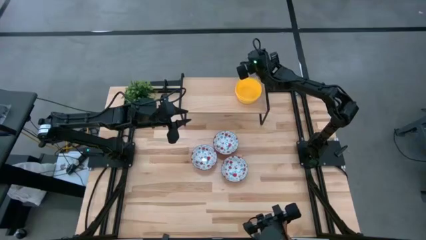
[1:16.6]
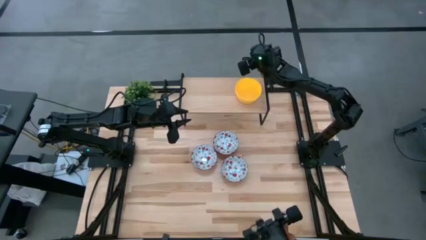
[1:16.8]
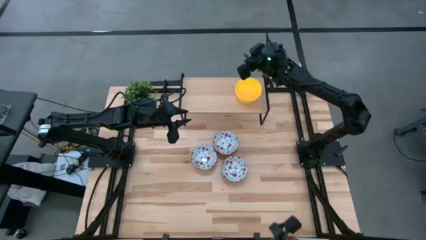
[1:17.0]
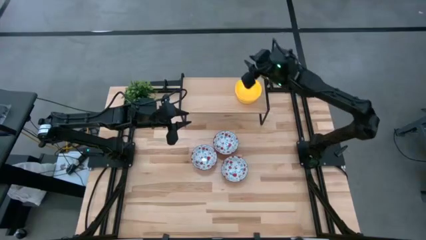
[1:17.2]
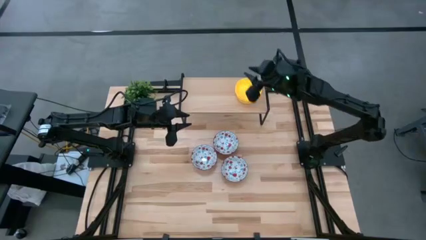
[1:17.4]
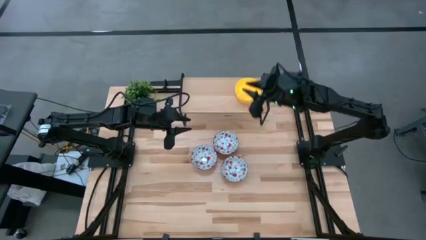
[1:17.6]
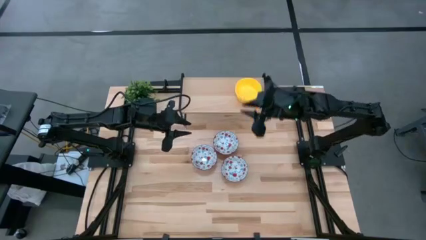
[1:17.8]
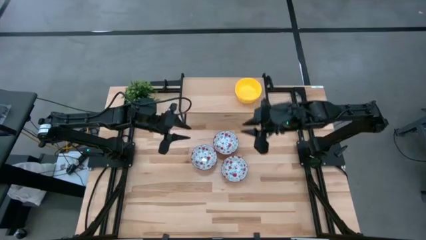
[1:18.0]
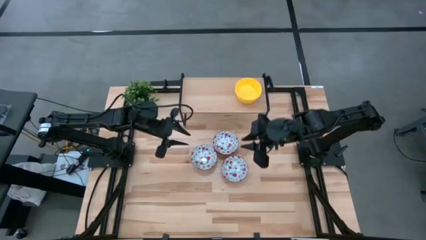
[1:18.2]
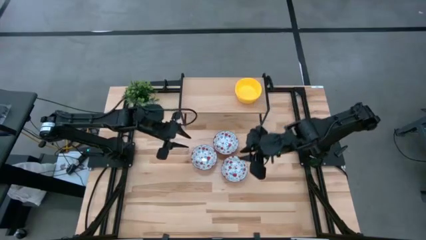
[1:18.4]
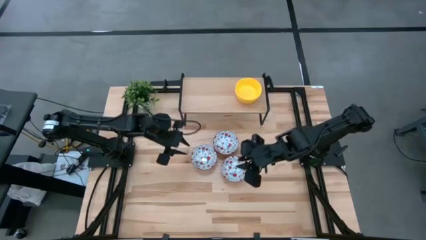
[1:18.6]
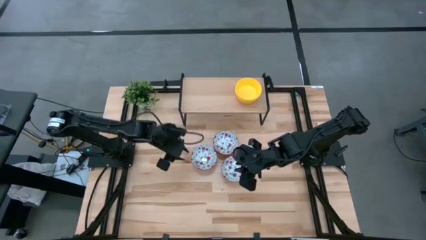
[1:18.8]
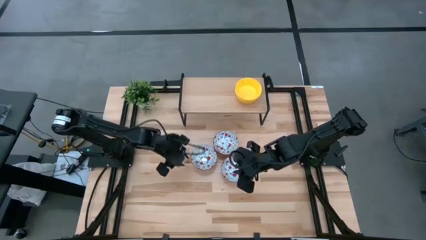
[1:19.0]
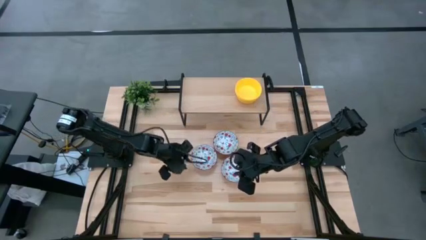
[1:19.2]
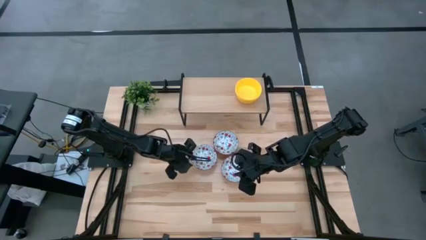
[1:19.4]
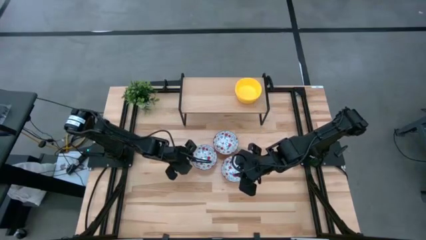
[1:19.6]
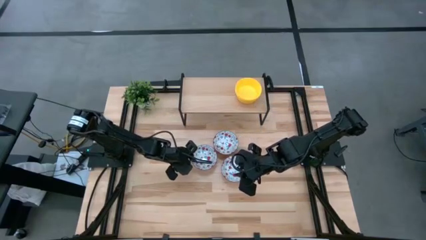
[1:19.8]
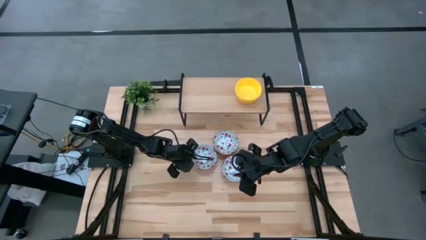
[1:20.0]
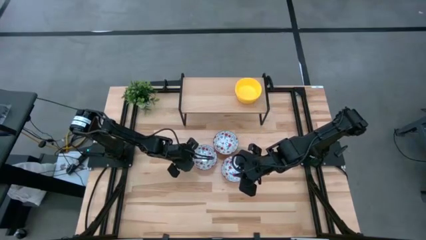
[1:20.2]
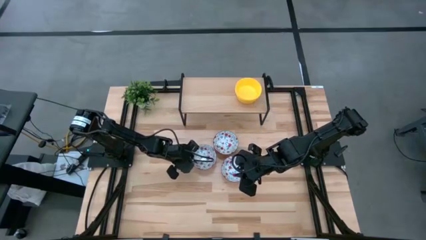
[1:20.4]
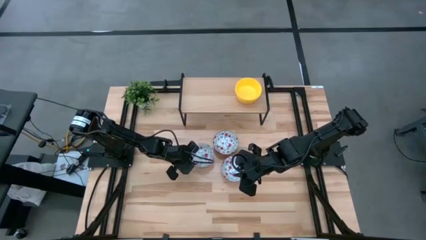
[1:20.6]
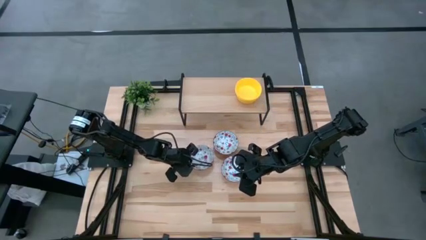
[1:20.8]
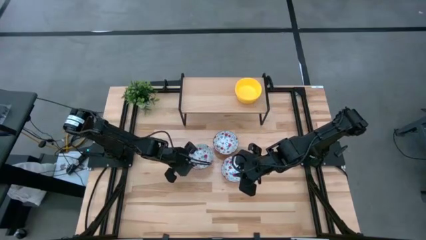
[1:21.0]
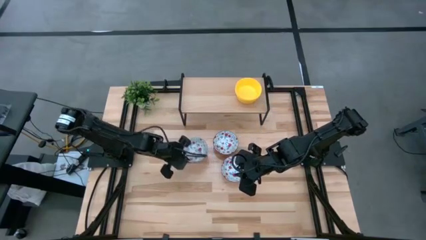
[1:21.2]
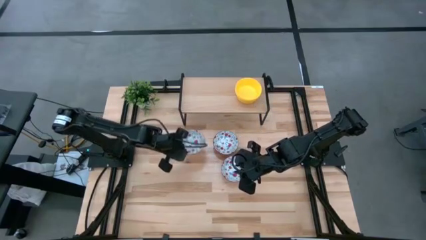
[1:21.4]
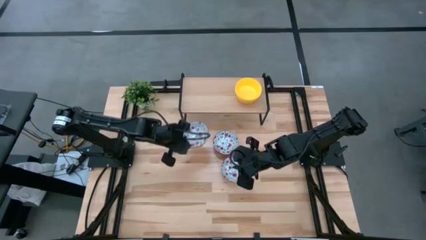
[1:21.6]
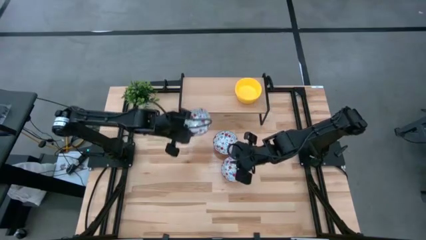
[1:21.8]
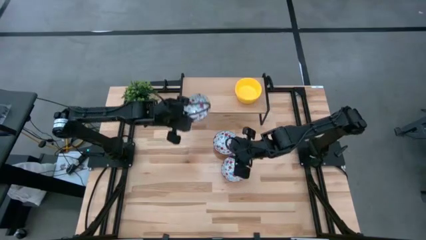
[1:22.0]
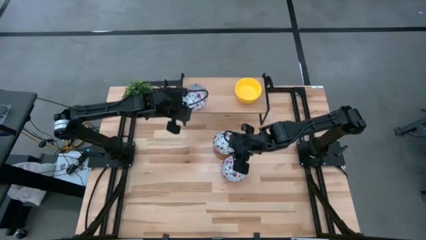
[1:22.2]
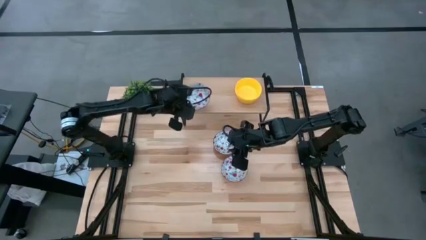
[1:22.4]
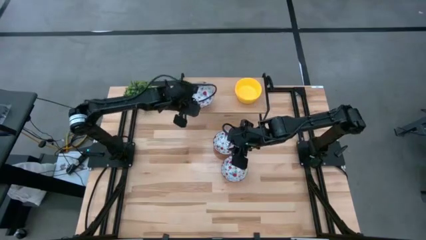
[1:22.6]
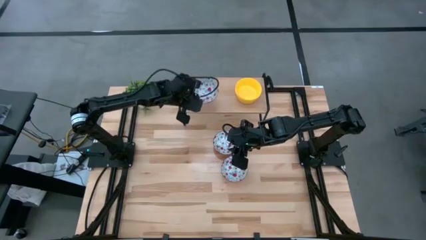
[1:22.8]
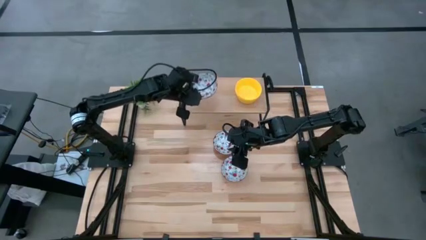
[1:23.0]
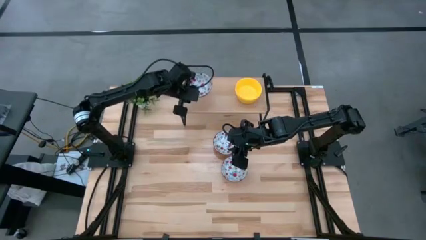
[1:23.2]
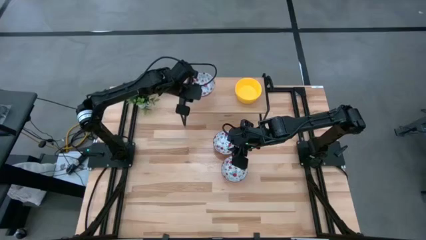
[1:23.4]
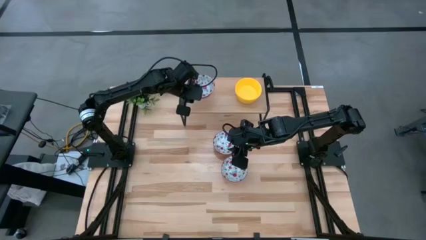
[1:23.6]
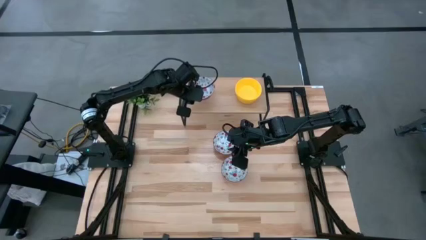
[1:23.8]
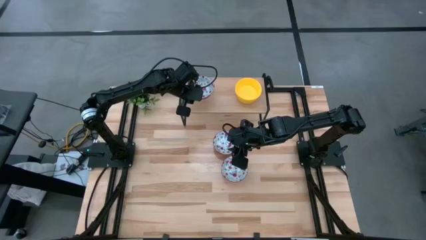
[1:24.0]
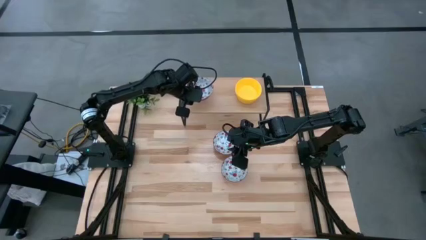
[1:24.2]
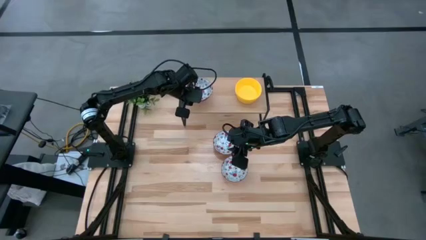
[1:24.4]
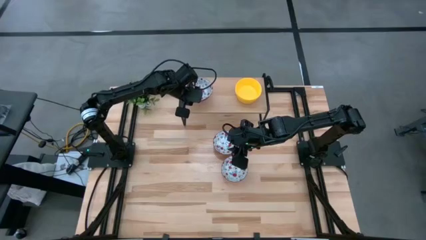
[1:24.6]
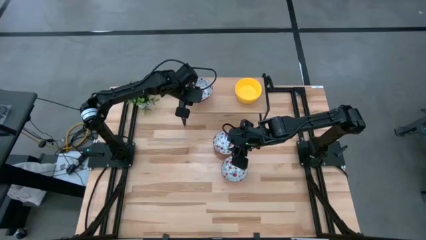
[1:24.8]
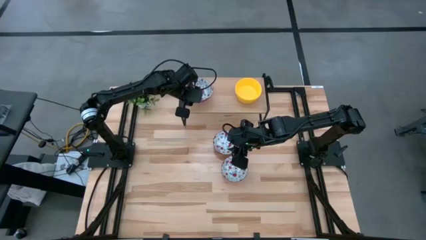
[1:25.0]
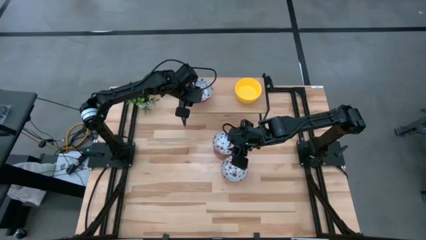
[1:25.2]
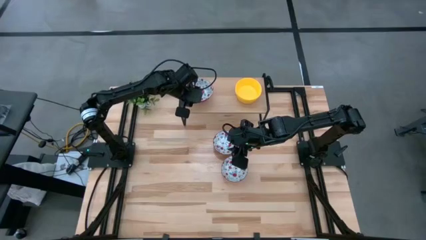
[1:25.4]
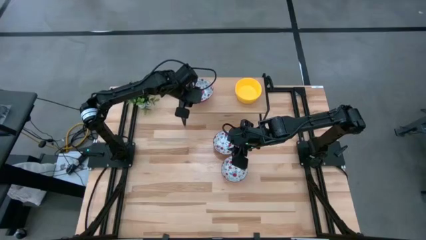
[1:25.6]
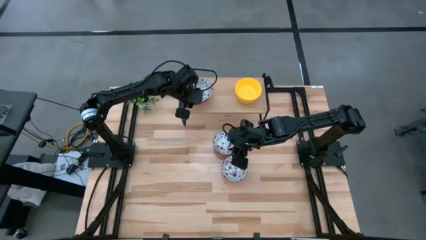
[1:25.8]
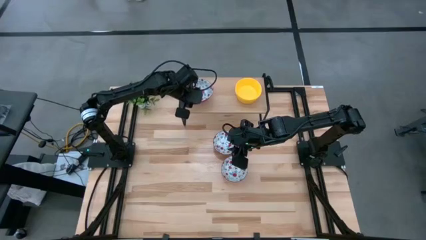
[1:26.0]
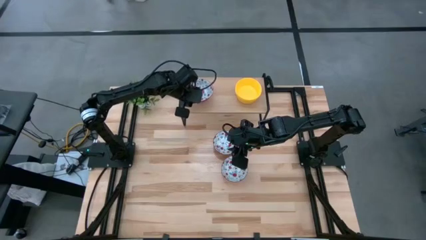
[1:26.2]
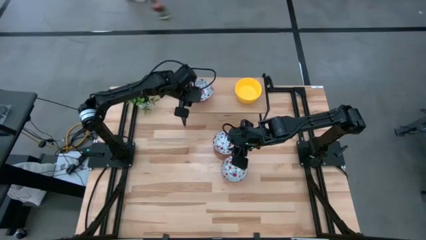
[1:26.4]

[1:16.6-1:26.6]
Task: Pick & Place Mini bowls
Put the bottom left red bowl on the shelf

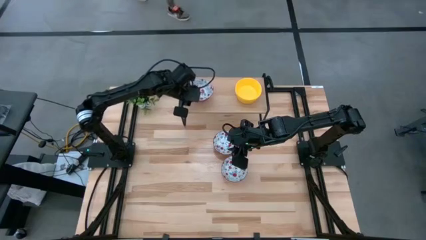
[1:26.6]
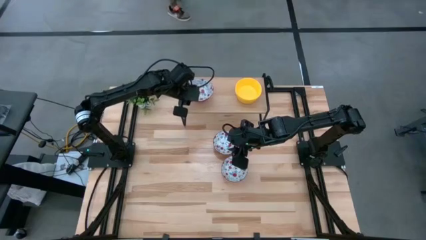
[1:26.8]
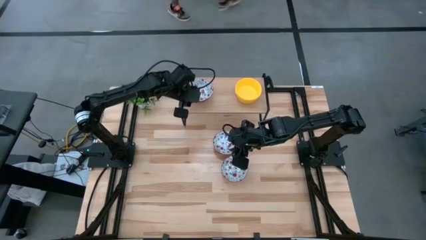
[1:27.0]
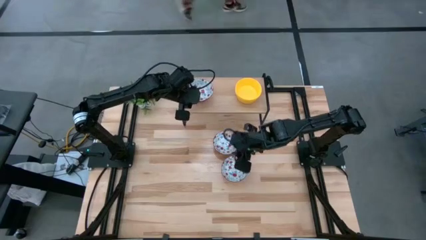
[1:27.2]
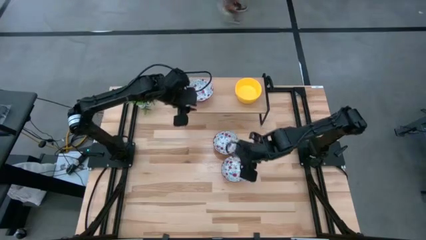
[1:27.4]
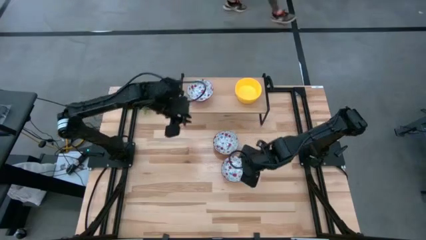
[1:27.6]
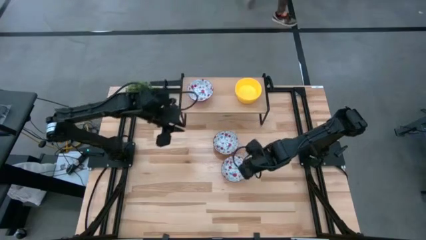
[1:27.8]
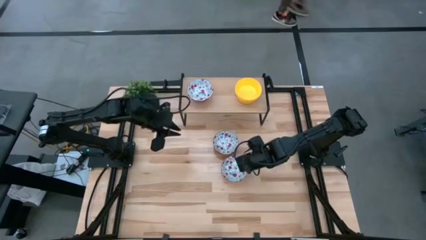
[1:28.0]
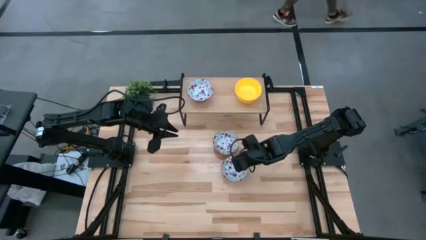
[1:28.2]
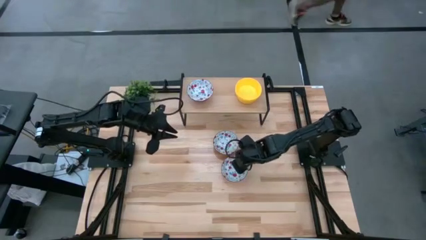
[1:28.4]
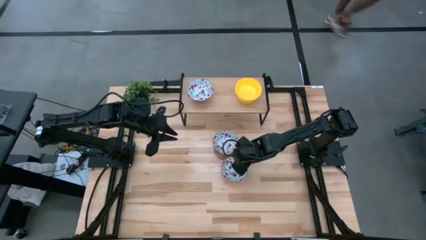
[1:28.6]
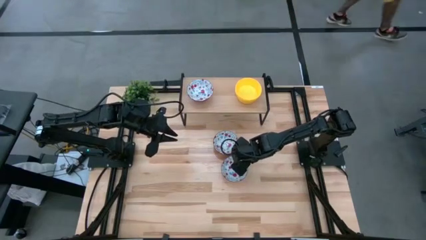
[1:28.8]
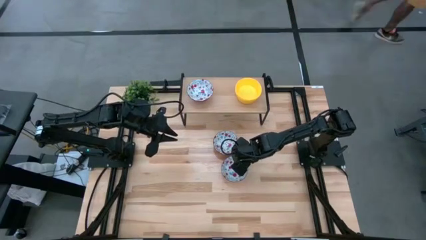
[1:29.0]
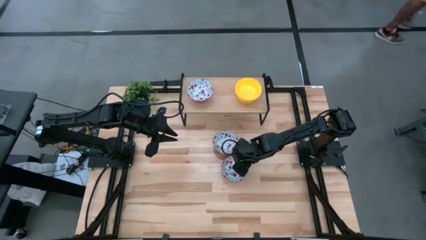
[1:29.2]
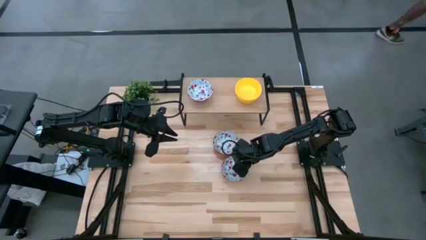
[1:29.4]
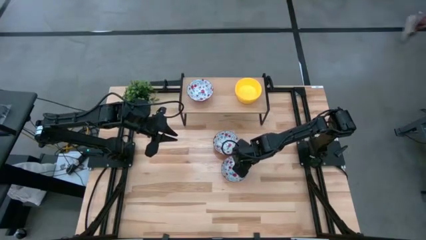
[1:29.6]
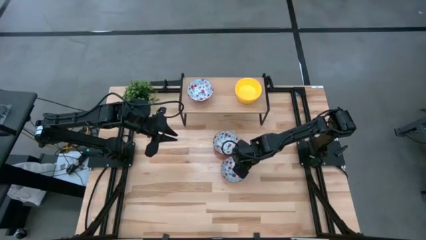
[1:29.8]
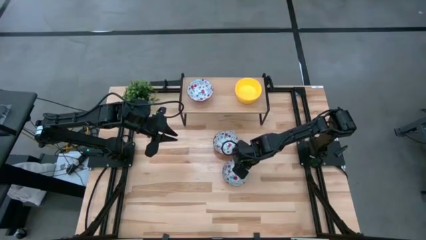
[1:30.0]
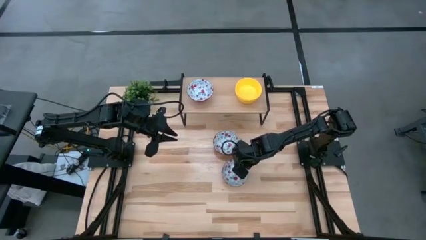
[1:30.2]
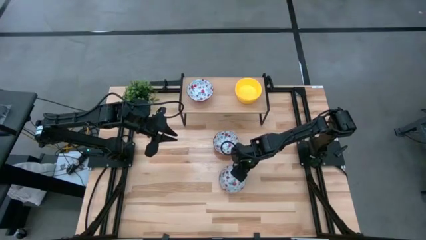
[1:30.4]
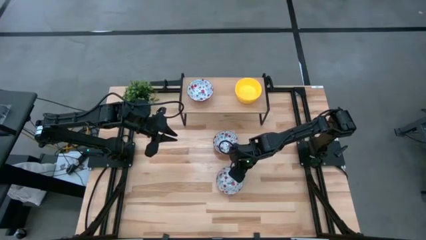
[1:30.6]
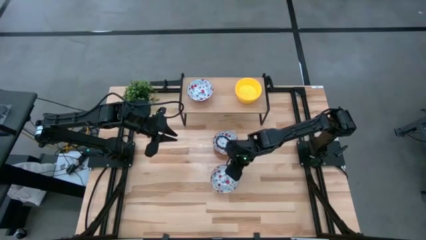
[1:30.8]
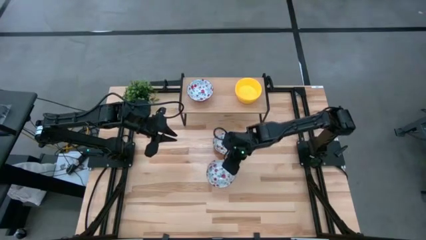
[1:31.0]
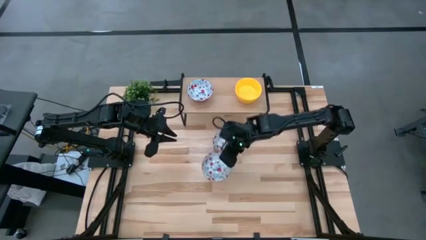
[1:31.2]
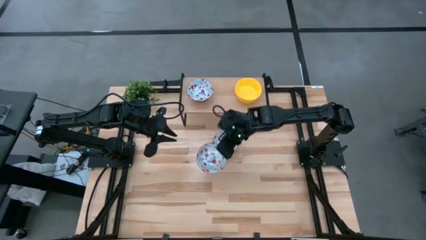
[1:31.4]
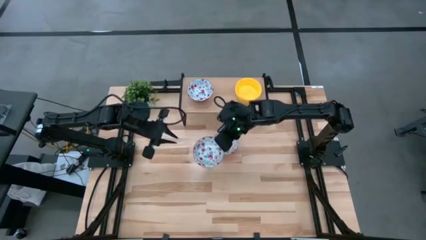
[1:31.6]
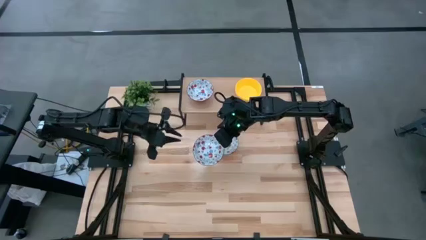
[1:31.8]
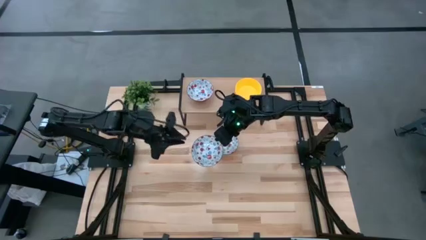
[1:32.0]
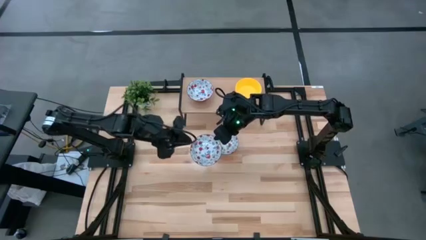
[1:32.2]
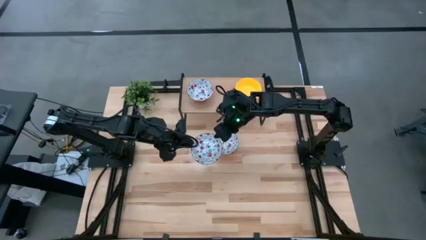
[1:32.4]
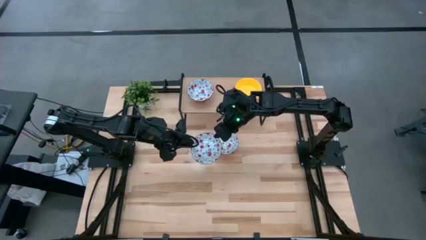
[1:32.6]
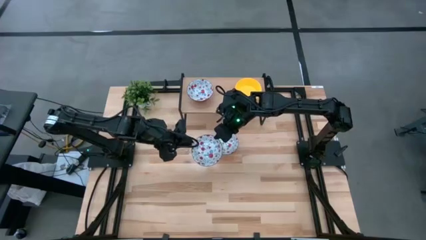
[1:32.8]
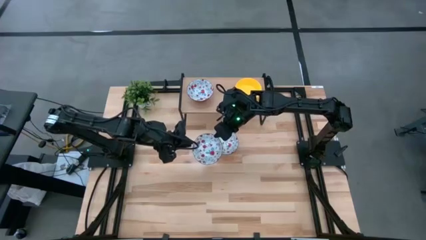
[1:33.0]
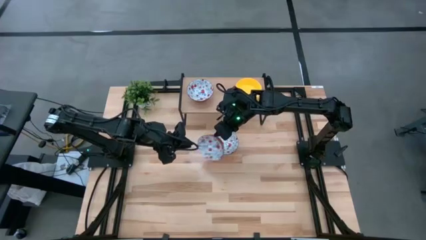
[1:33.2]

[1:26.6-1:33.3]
Stack the bottom red bowl on the other red bowl on the shelf
